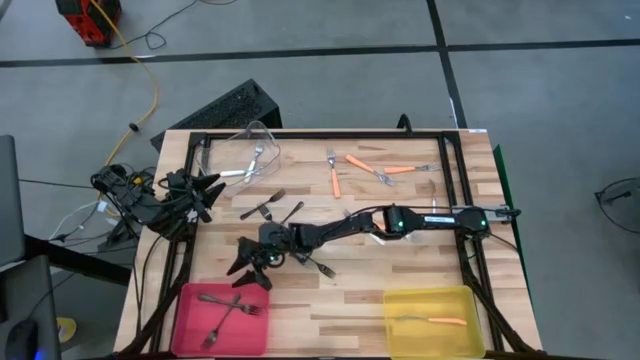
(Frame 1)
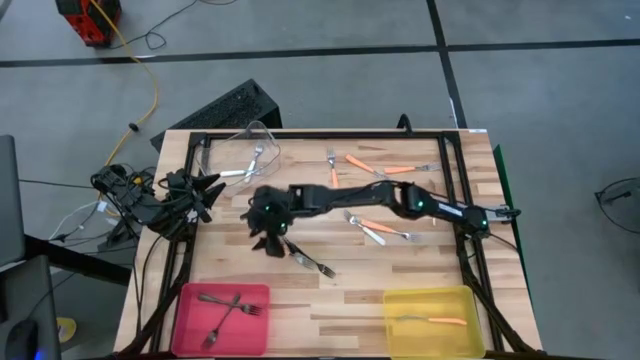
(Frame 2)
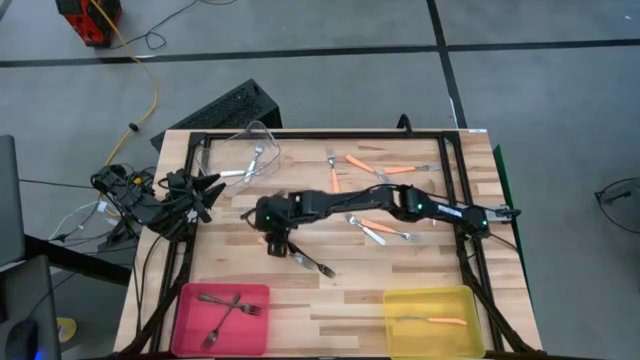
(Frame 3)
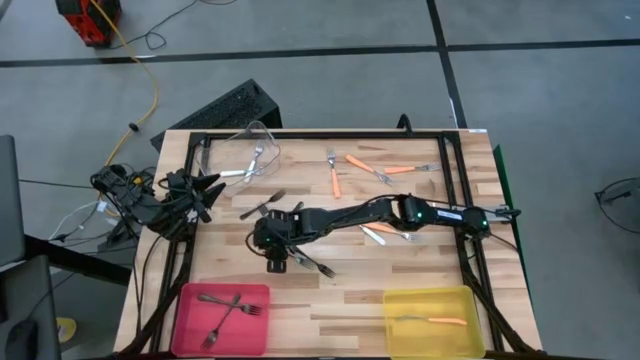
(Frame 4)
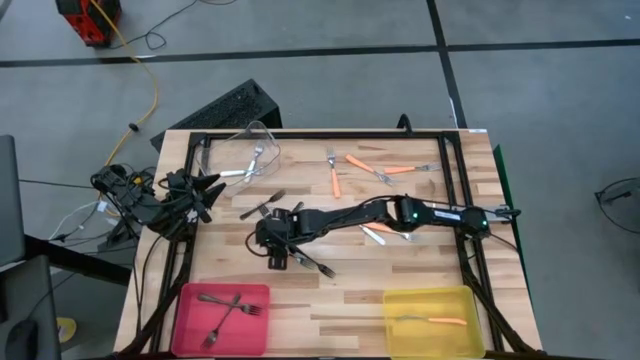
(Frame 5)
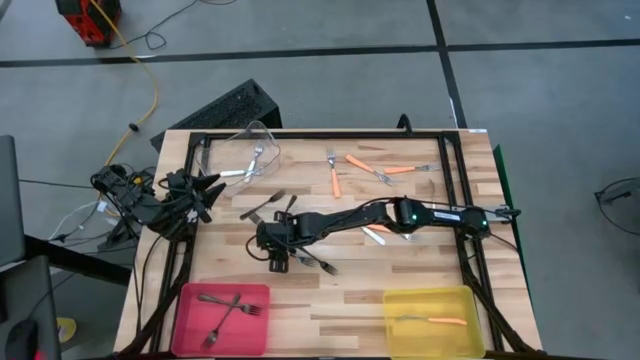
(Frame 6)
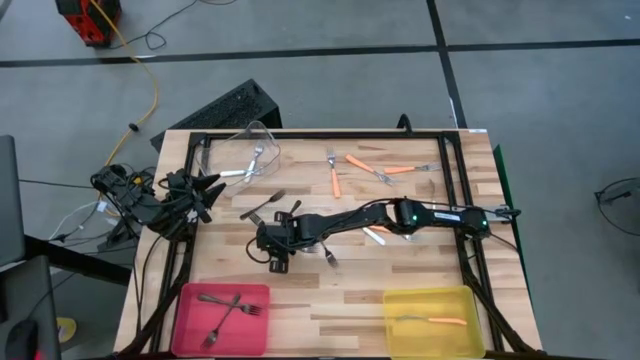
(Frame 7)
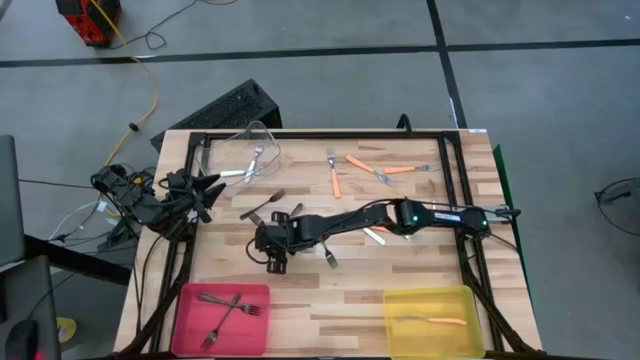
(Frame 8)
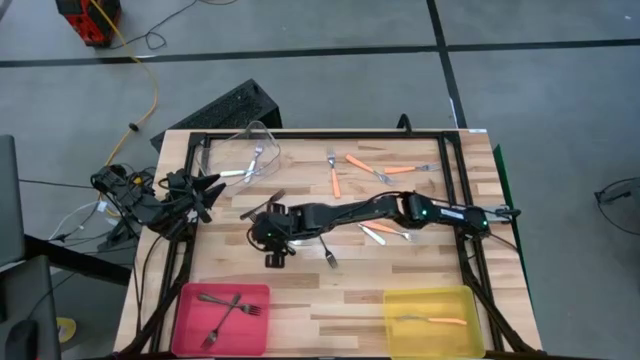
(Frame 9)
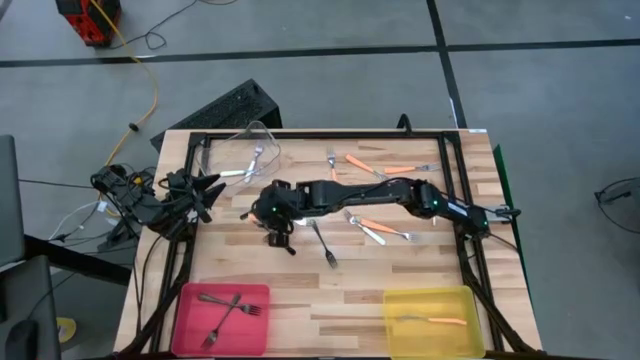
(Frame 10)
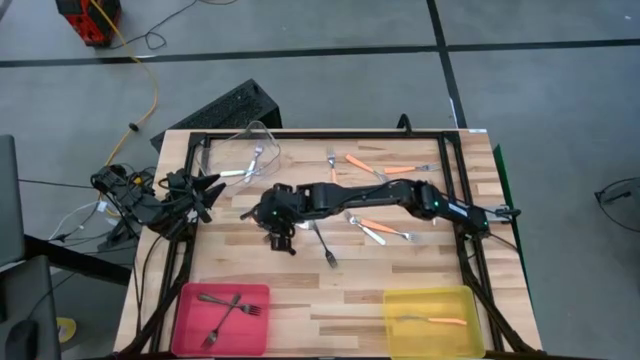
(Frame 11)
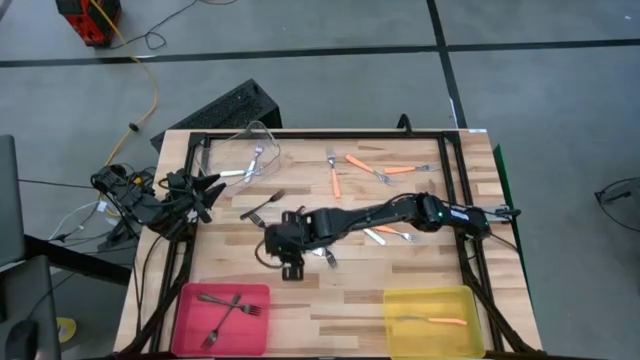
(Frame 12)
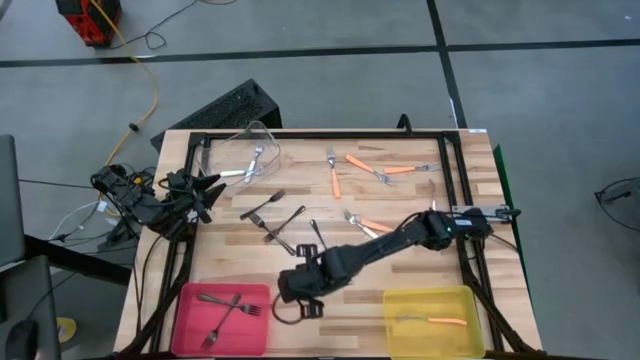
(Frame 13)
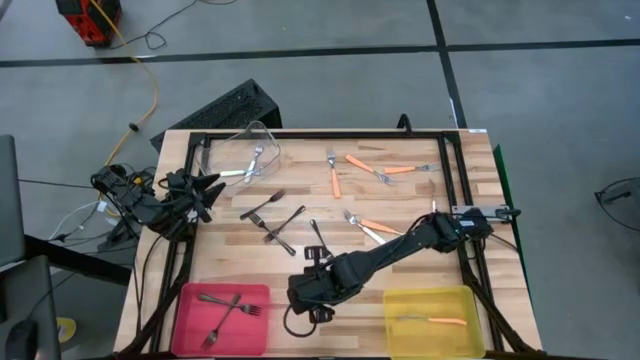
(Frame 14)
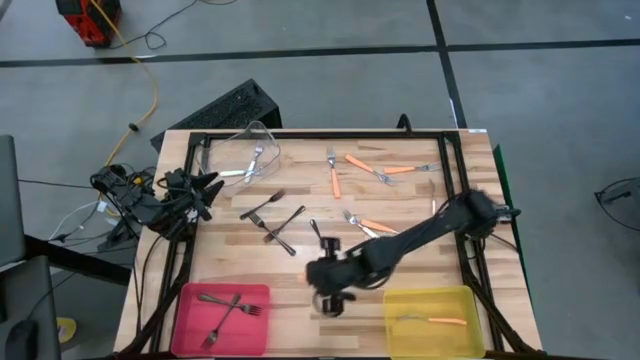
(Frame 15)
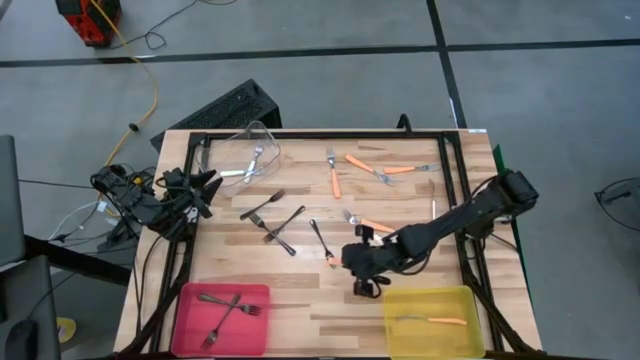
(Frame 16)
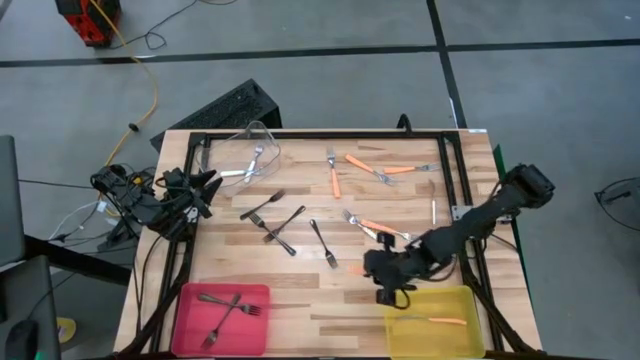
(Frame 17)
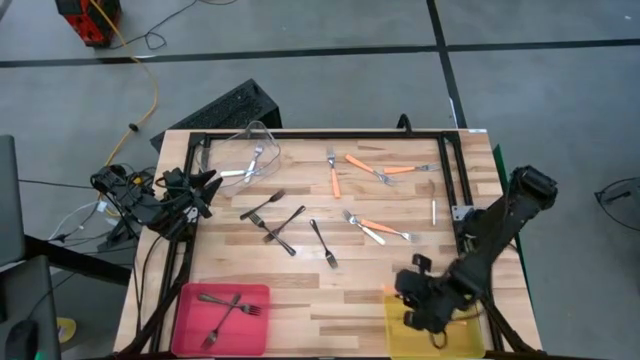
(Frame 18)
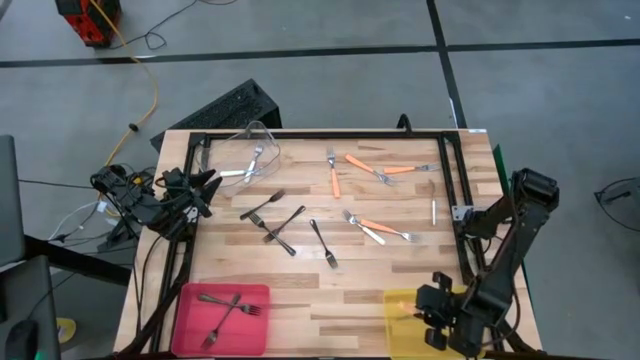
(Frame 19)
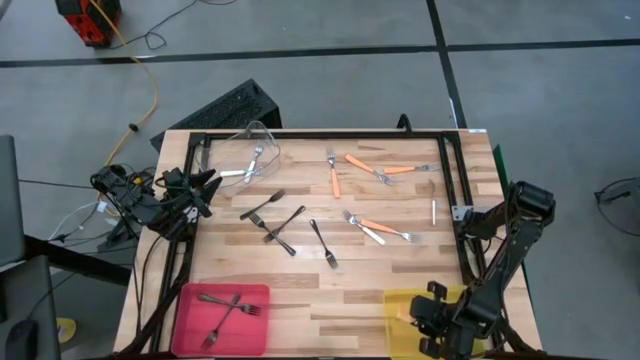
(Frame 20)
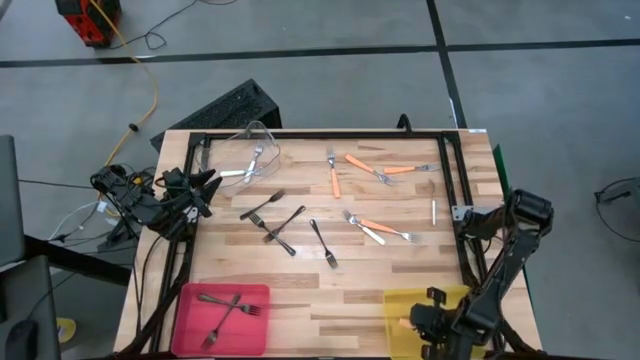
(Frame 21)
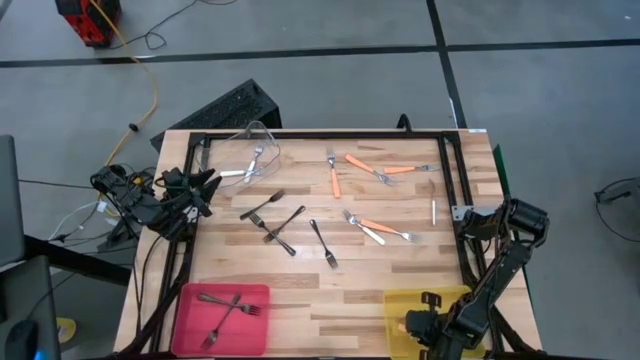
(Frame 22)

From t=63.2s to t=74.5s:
Task: Sort silverware by color (type)
Put the orange fork into the yellow bin

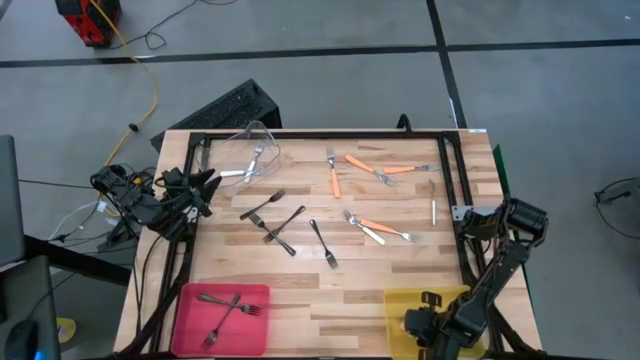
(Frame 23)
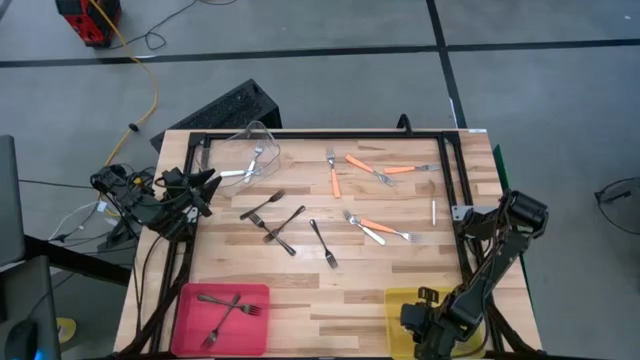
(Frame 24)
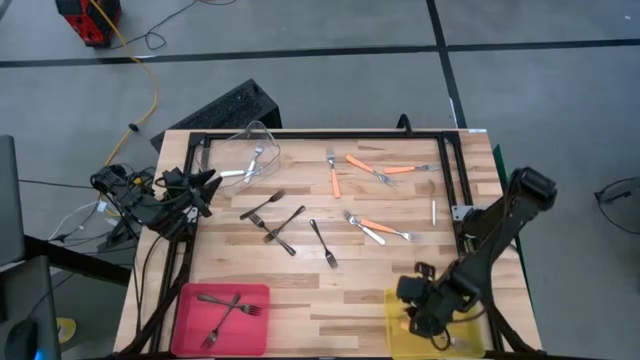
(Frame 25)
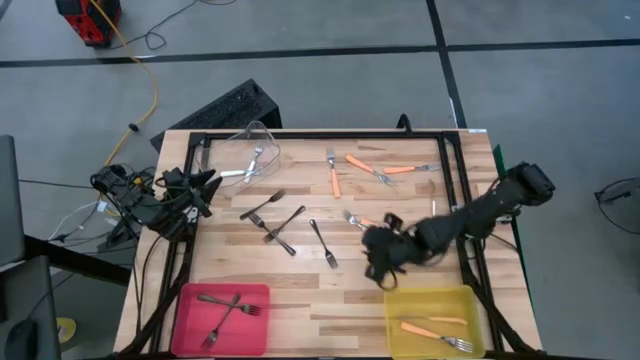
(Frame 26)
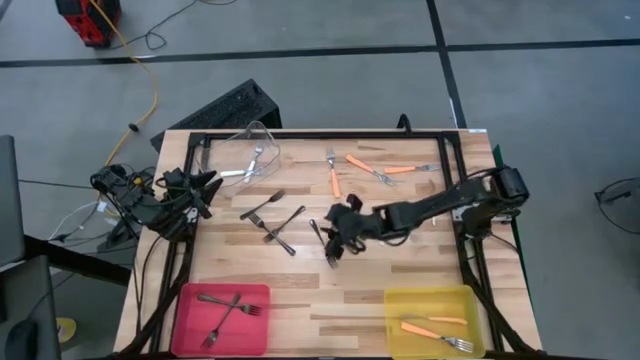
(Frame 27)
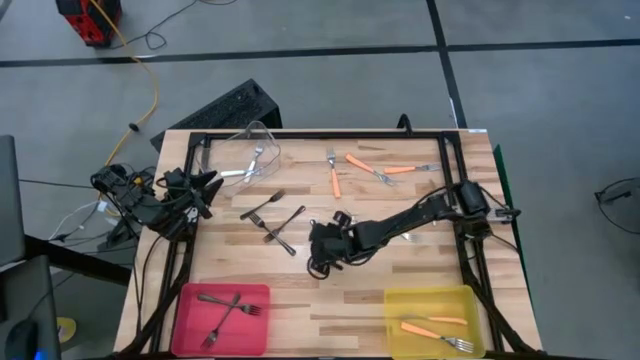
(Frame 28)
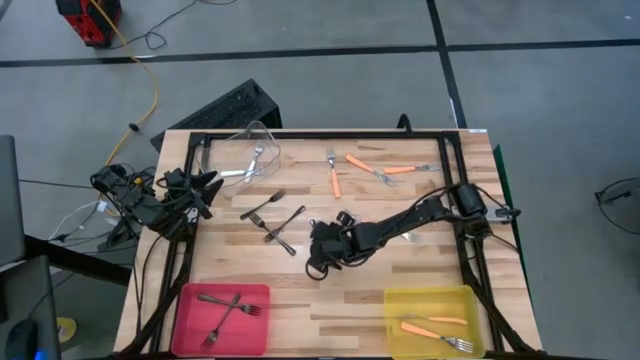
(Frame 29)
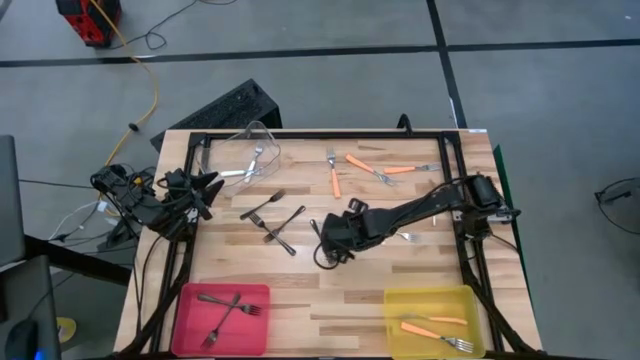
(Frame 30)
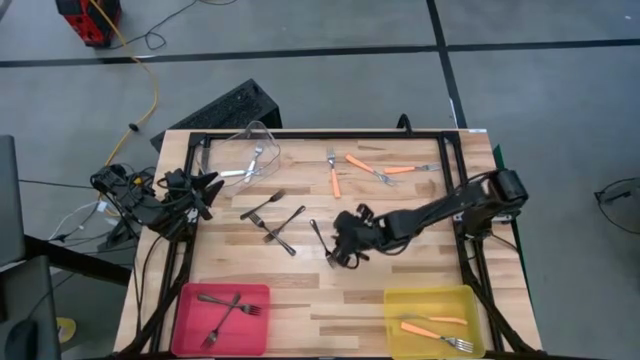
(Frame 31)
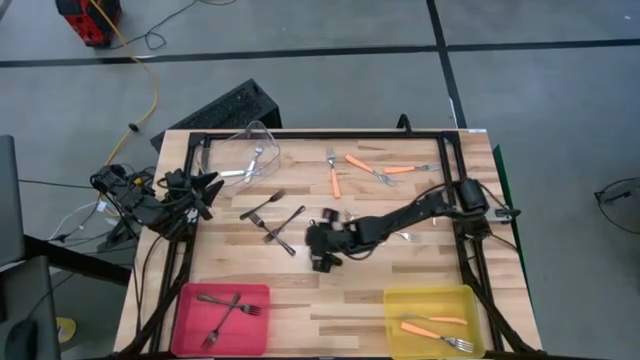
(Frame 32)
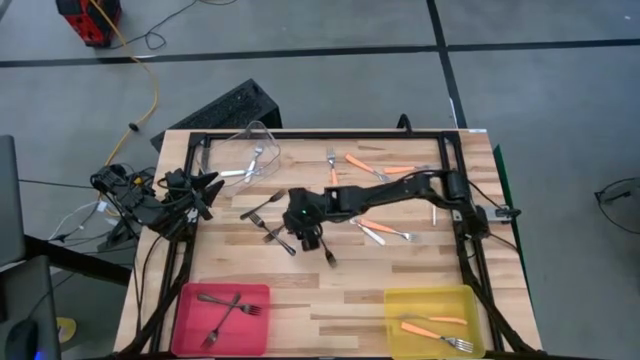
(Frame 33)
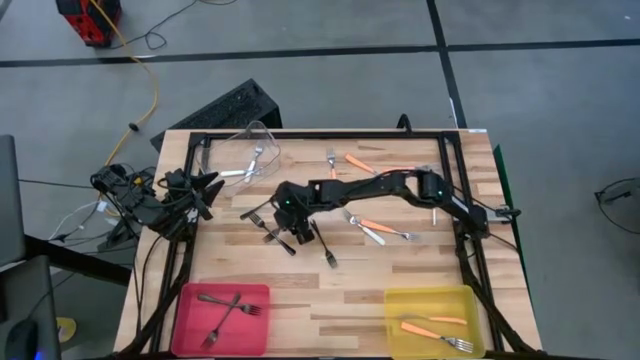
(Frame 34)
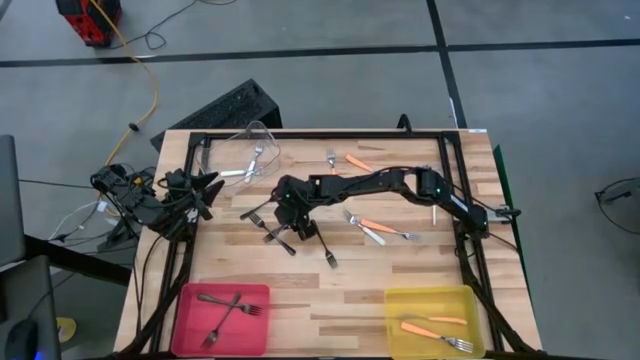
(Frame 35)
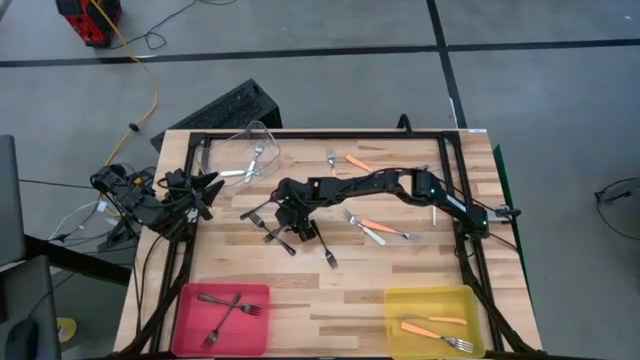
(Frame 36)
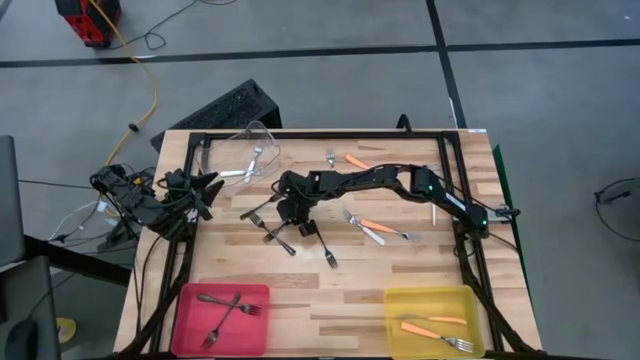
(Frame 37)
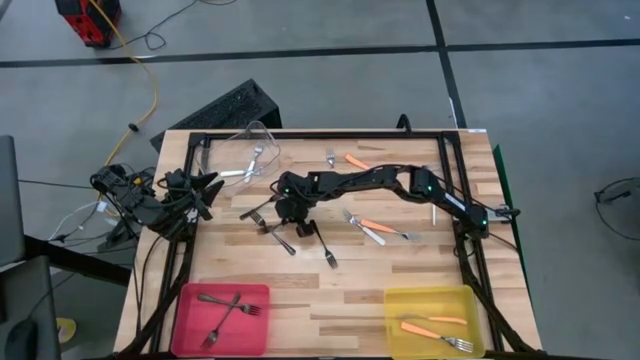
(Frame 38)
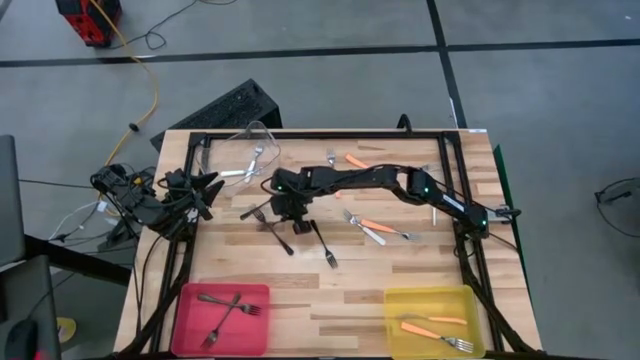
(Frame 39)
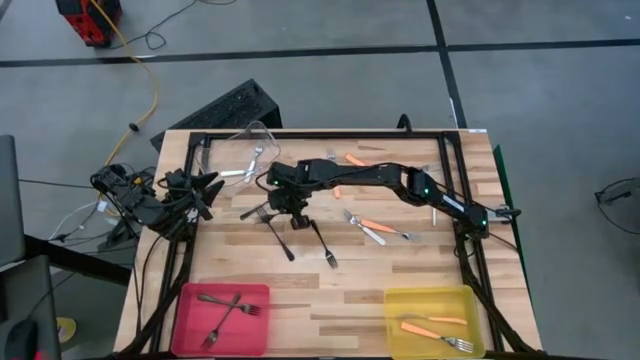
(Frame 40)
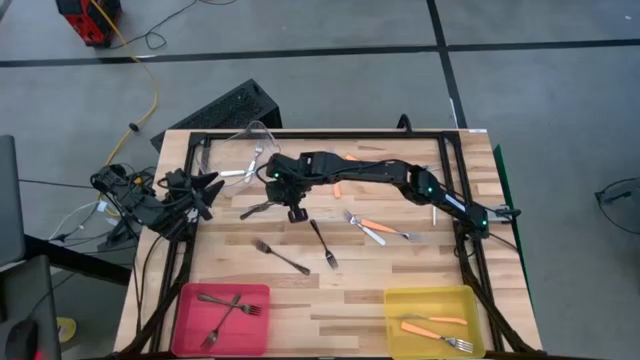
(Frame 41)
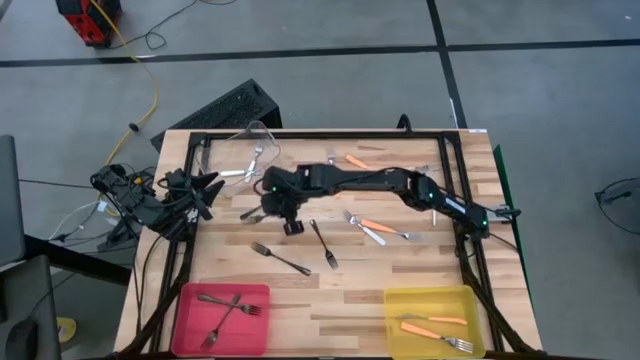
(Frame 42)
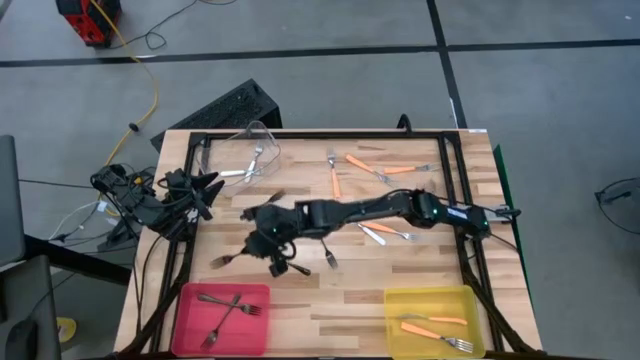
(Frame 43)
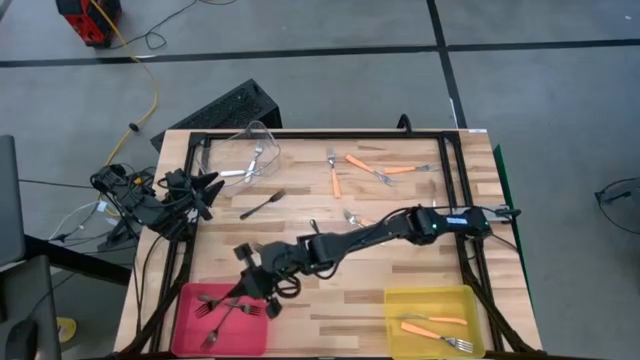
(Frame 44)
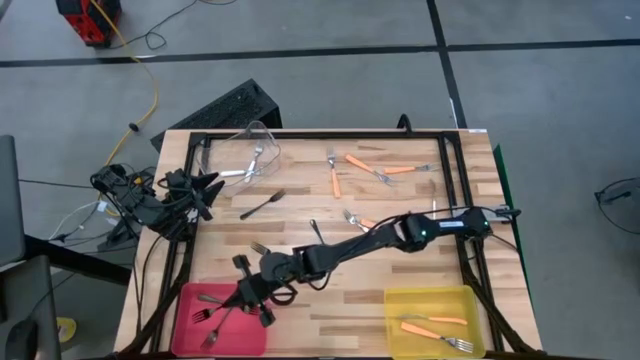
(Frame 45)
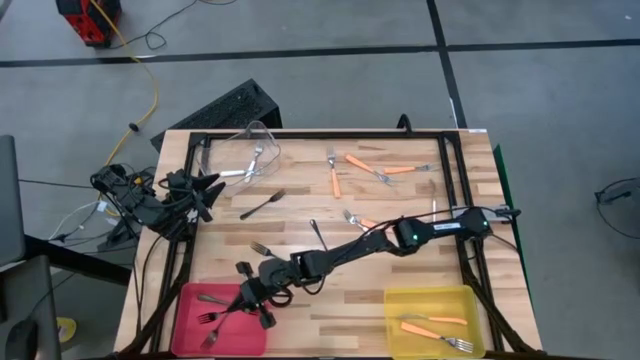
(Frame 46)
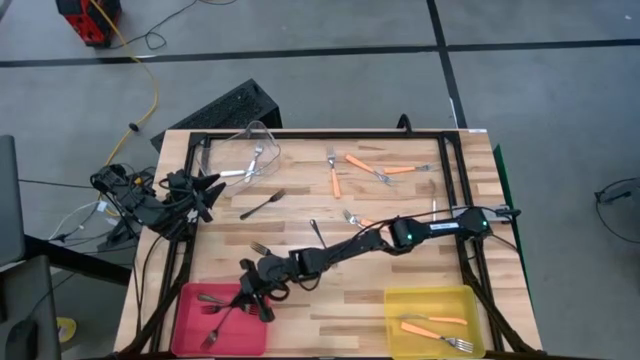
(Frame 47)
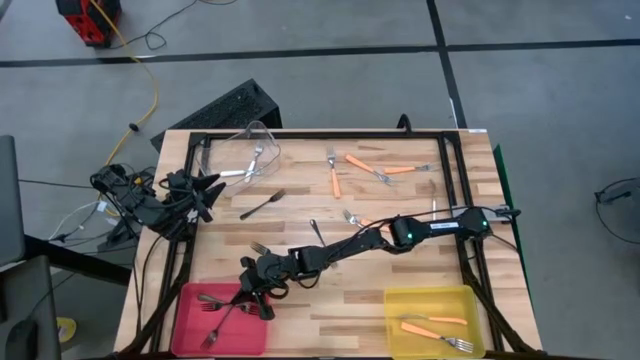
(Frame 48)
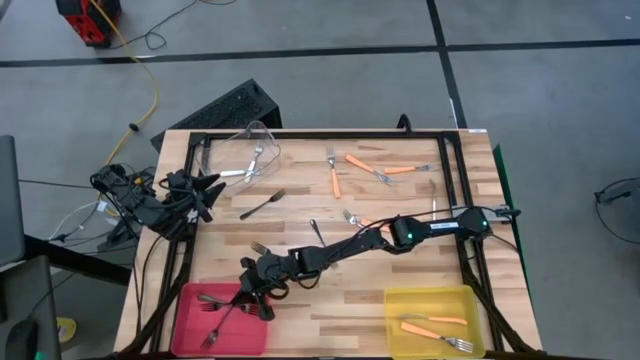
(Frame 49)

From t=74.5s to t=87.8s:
Put the black fork into the red bin
